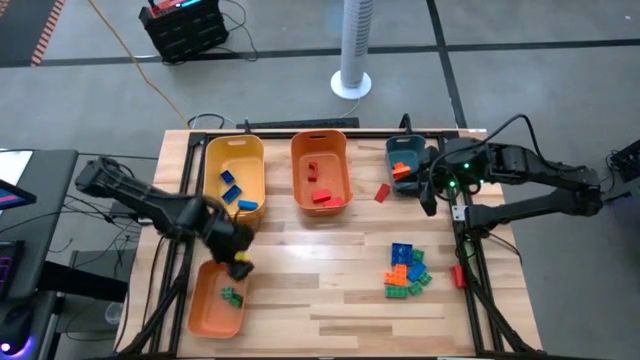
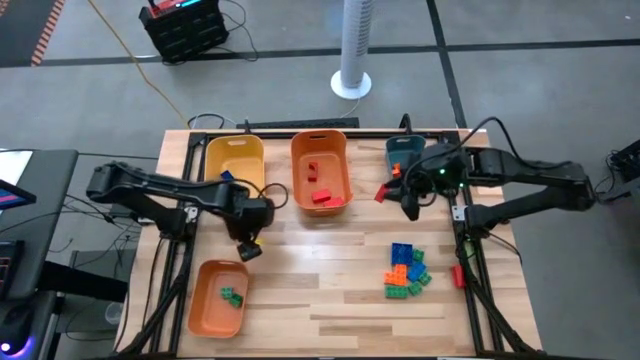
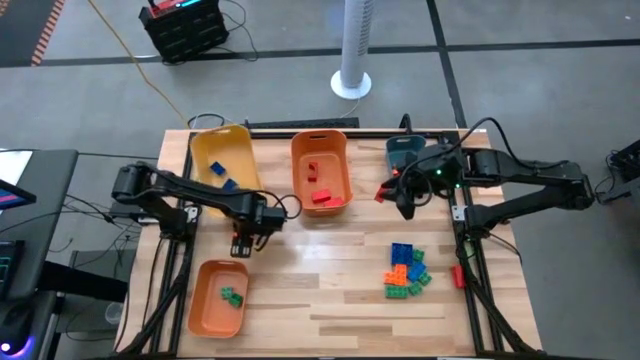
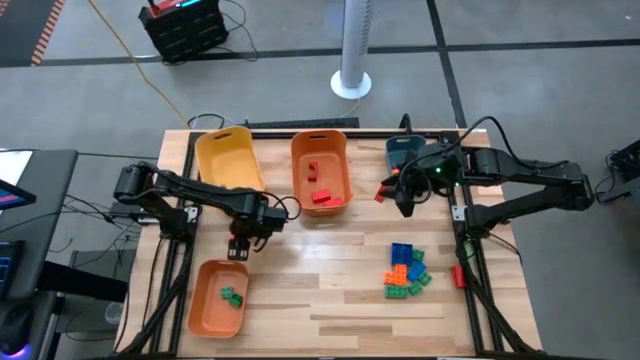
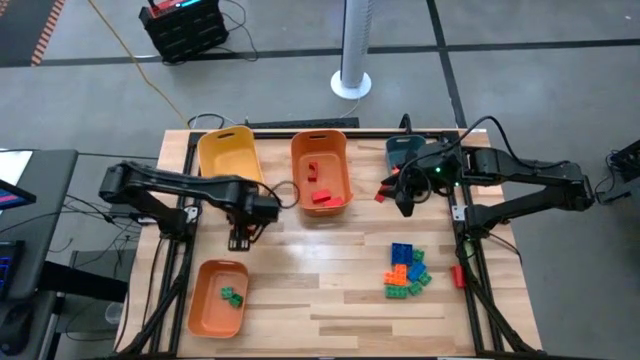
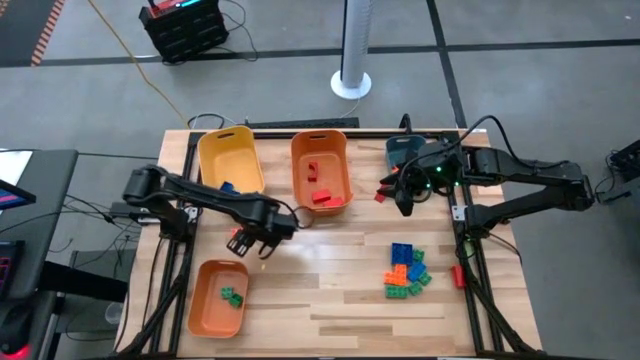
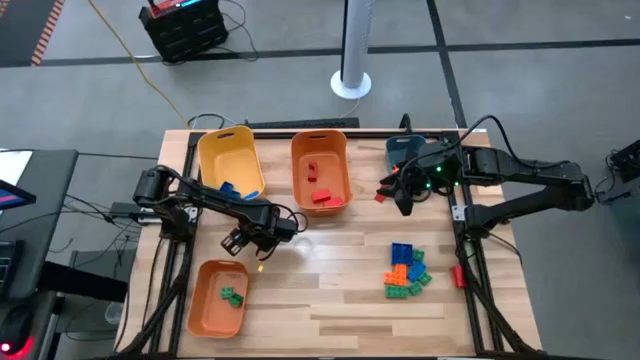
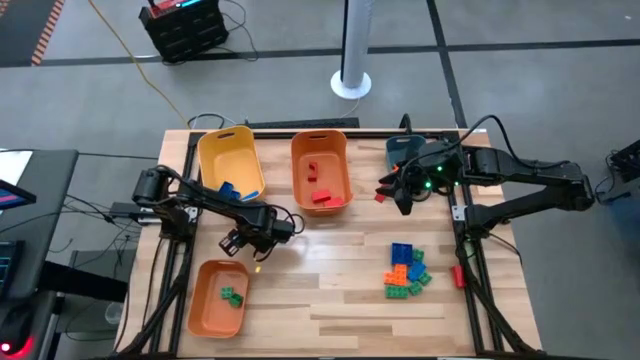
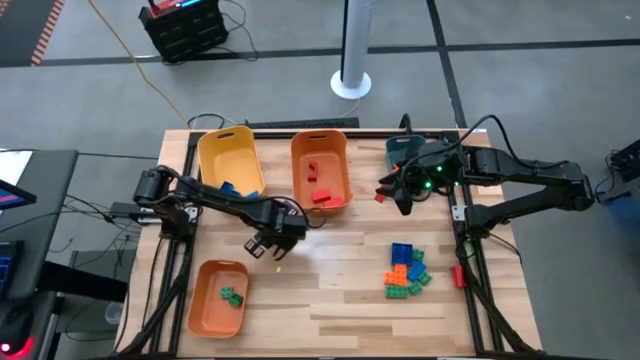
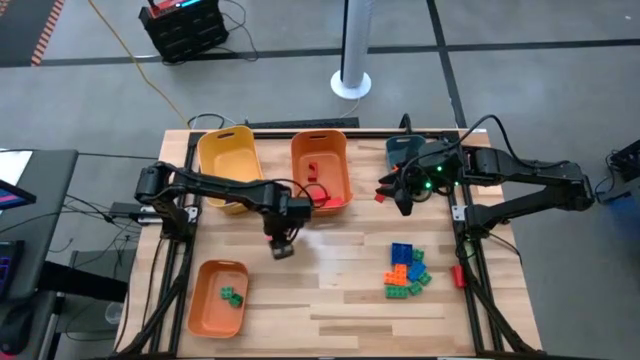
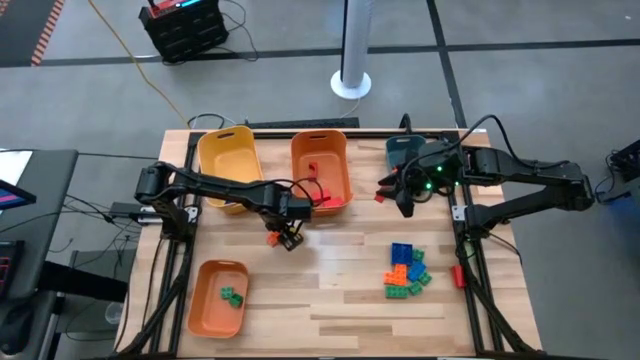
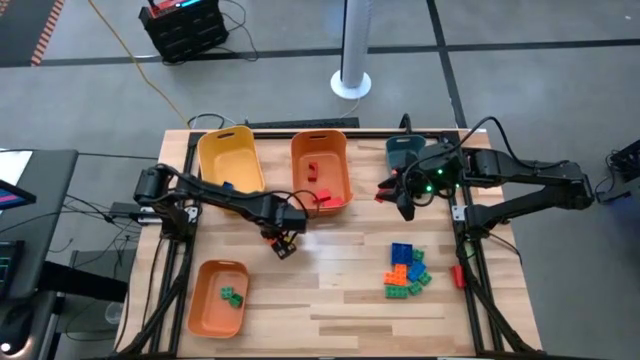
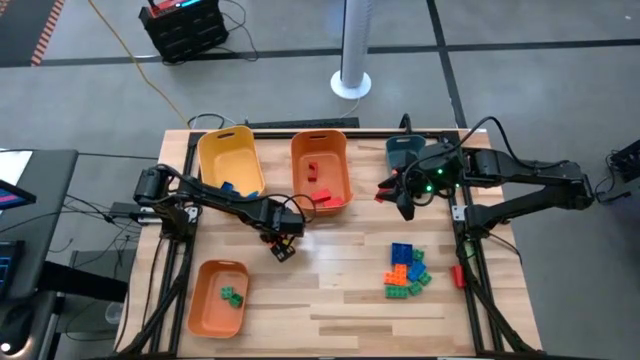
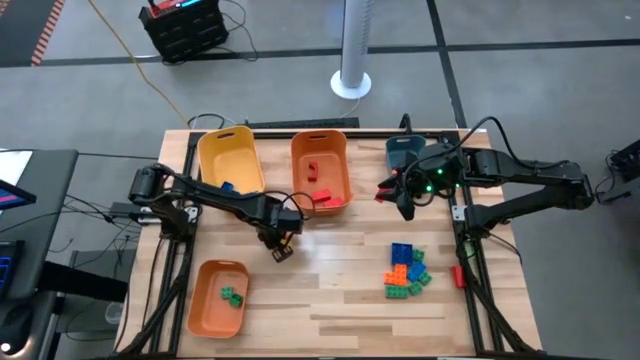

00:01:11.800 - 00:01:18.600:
Task: Sort blocks
Put the orange game piece into the blue bin

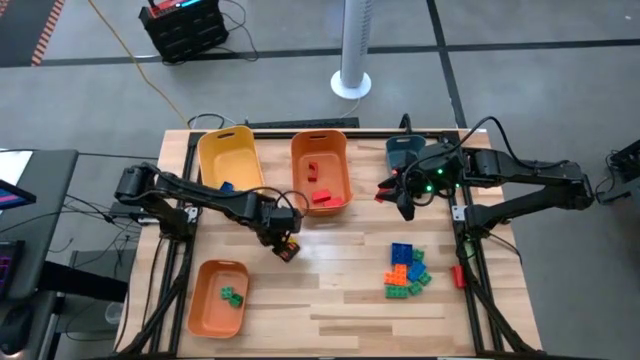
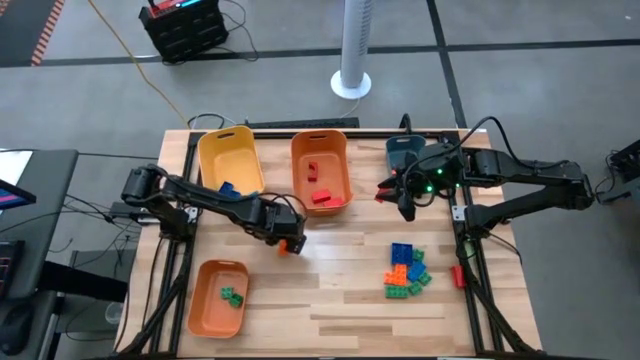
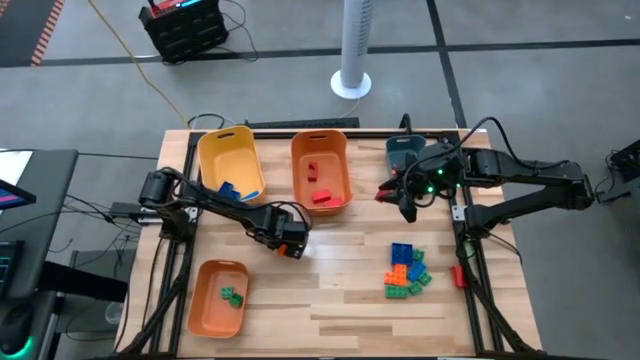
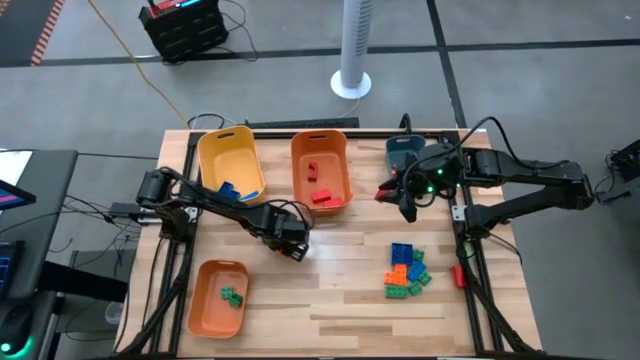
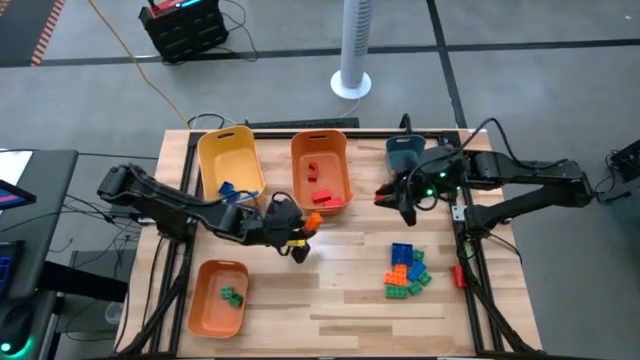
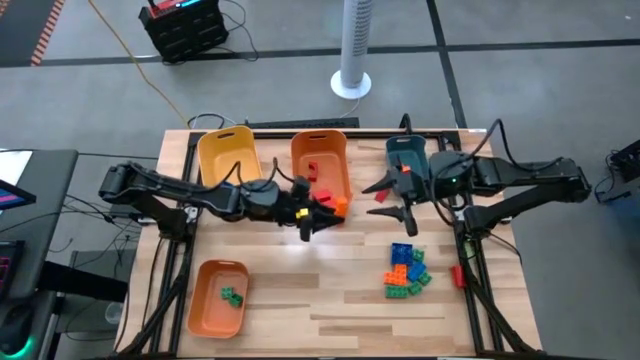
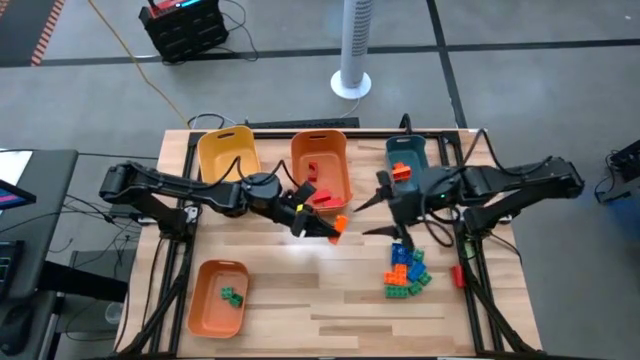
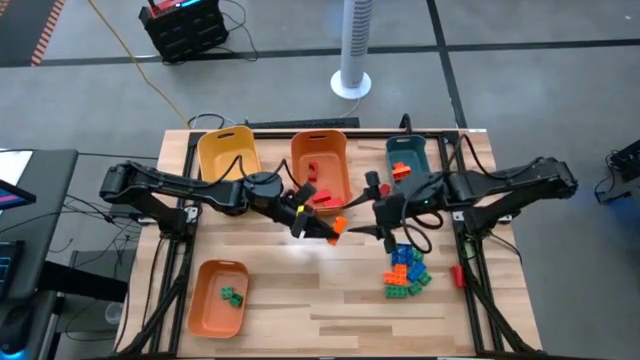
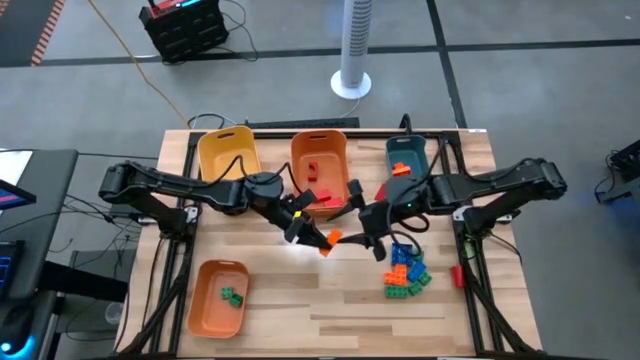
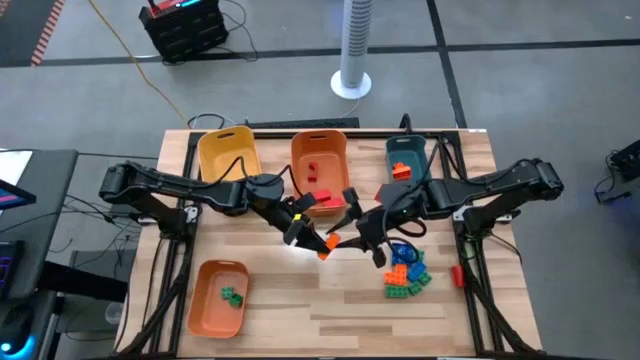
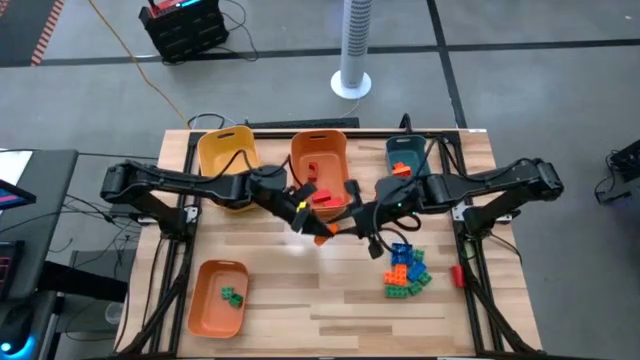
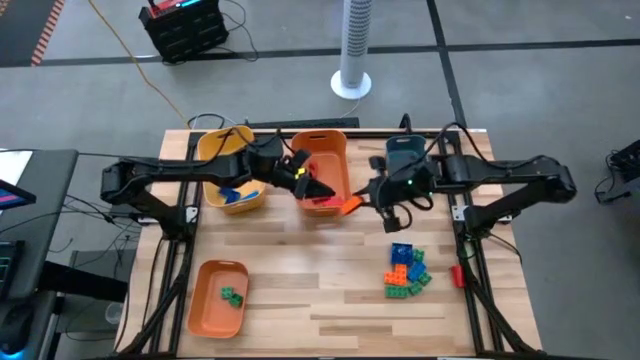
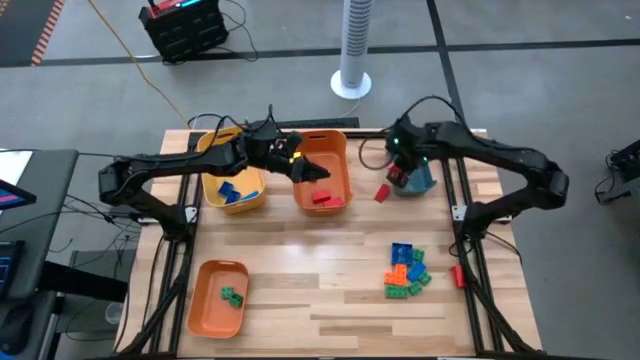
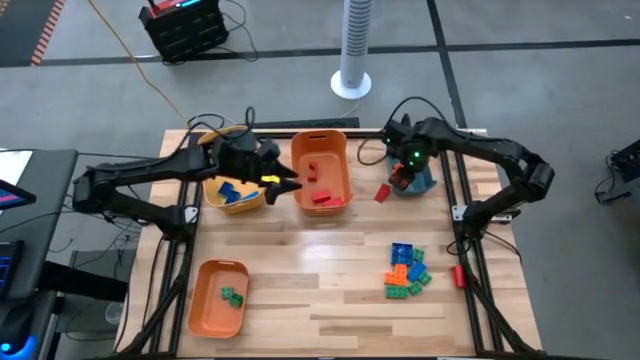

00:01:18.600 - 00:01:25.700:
Put the orange game piece into the blue bin

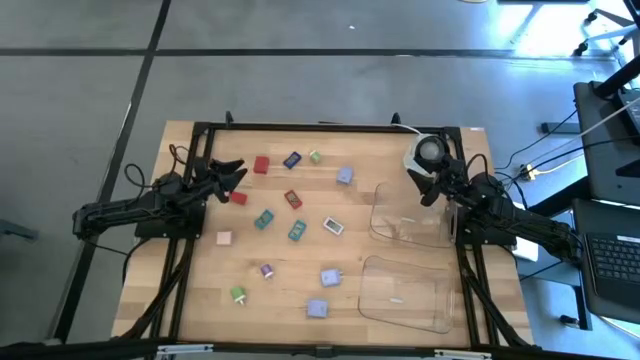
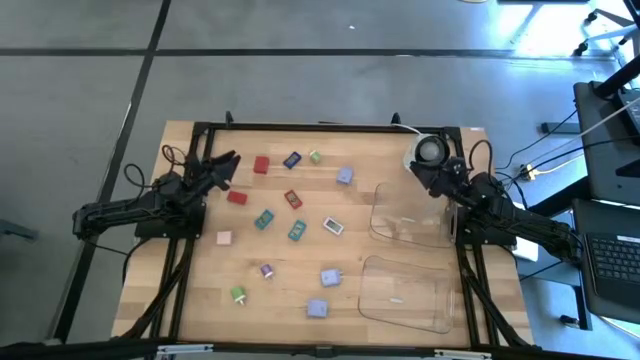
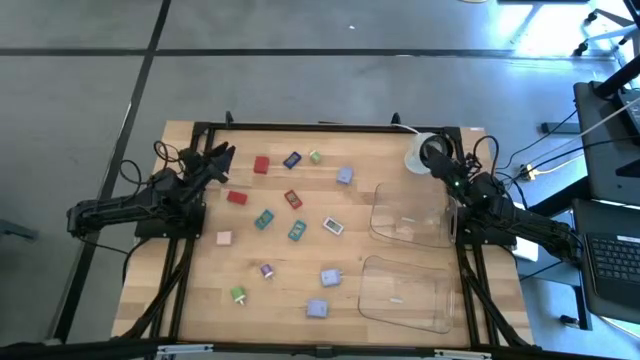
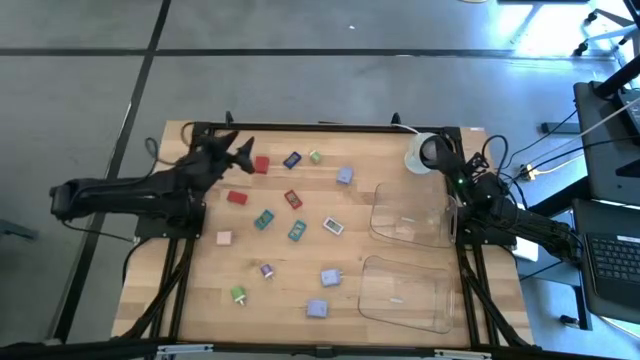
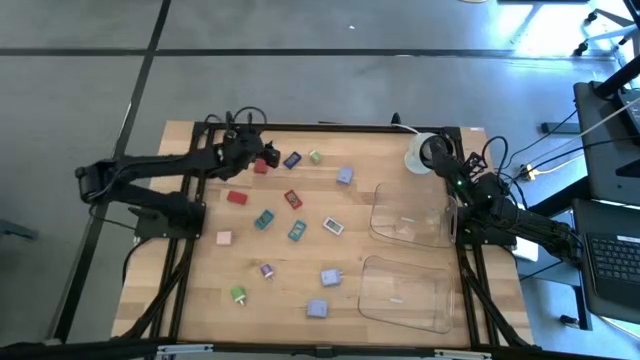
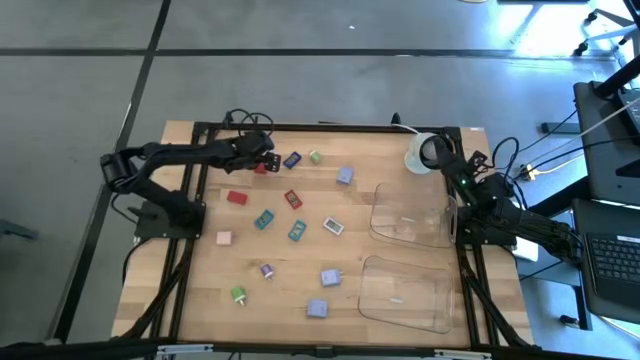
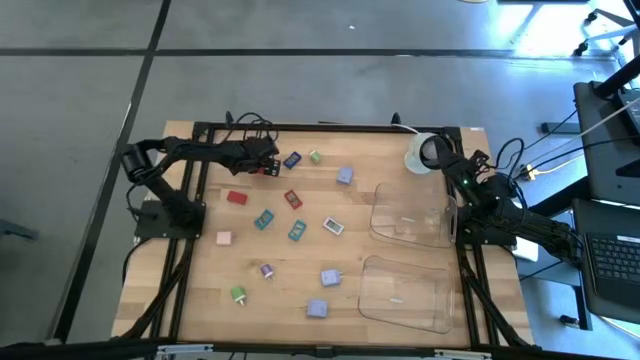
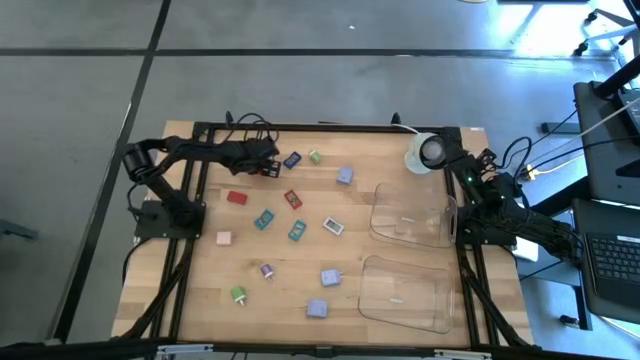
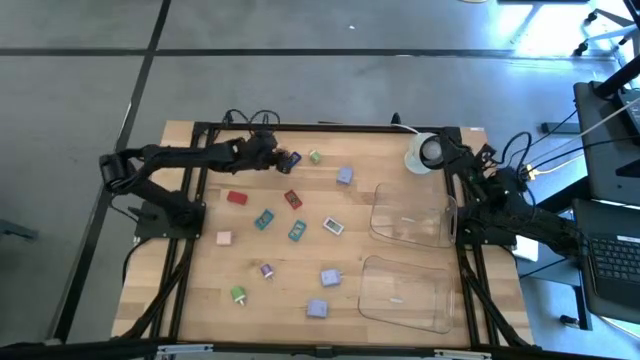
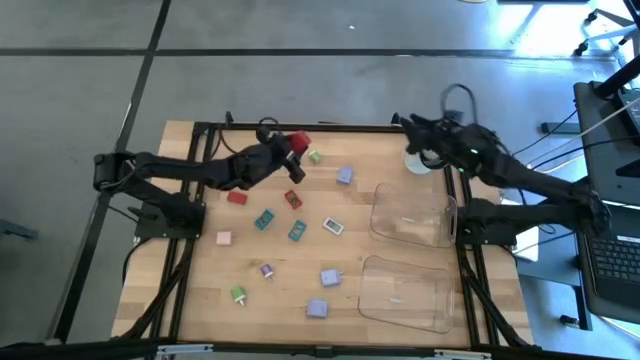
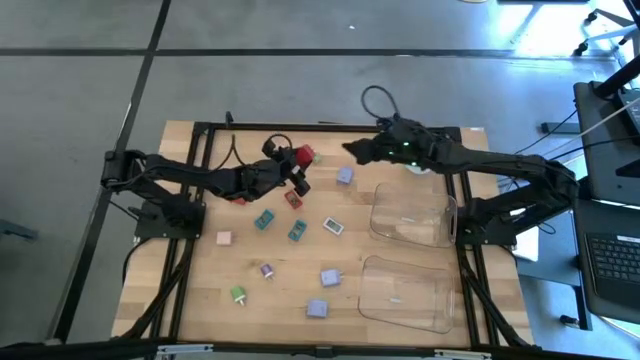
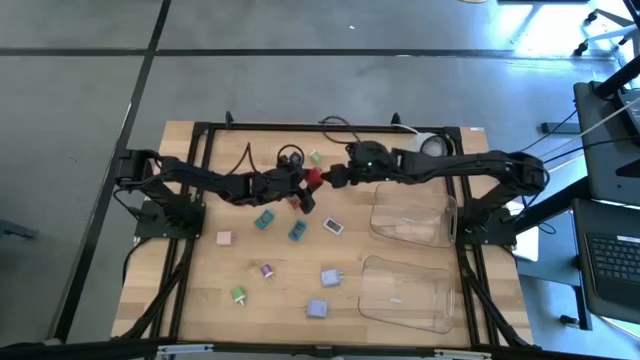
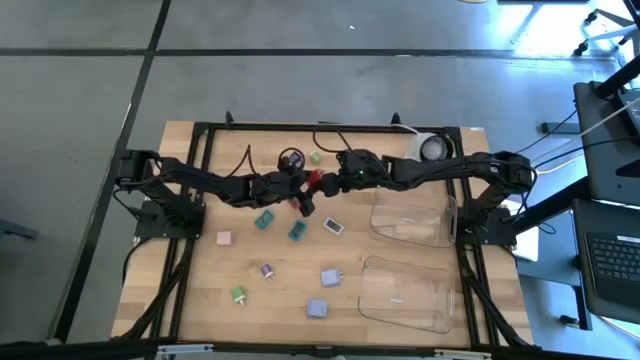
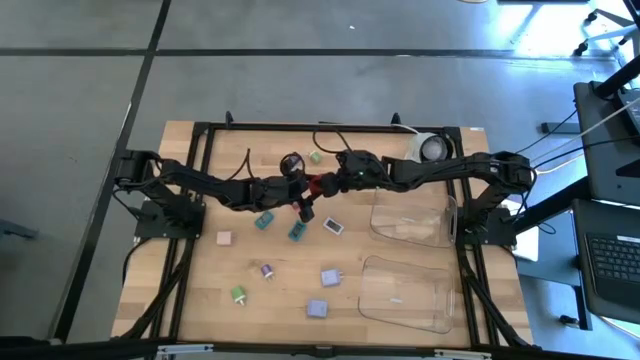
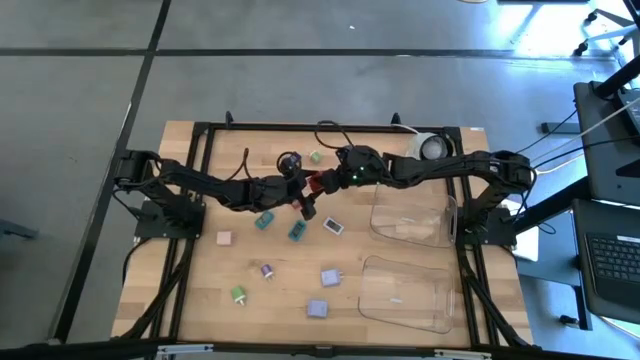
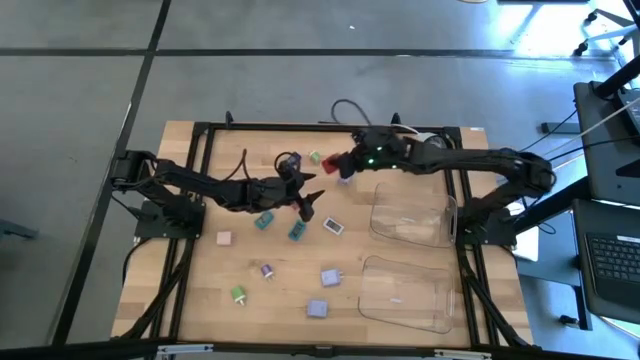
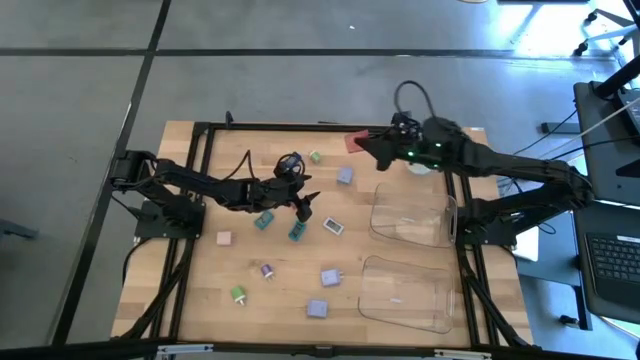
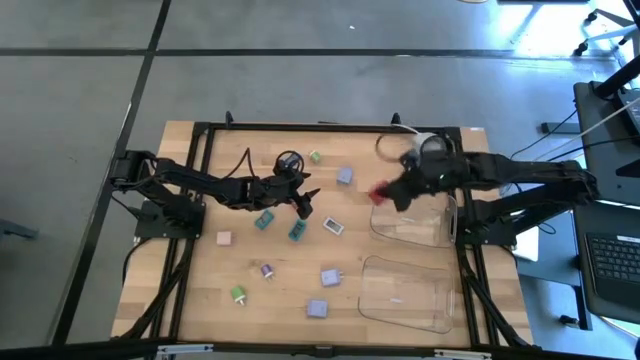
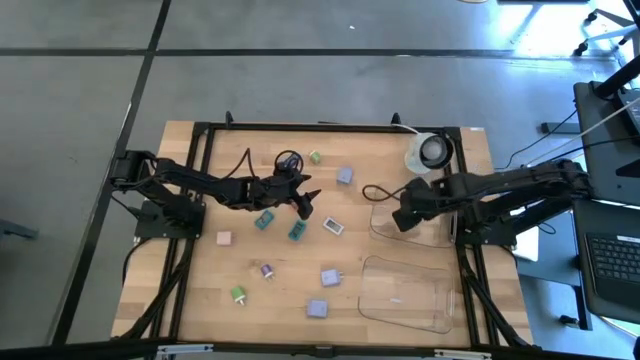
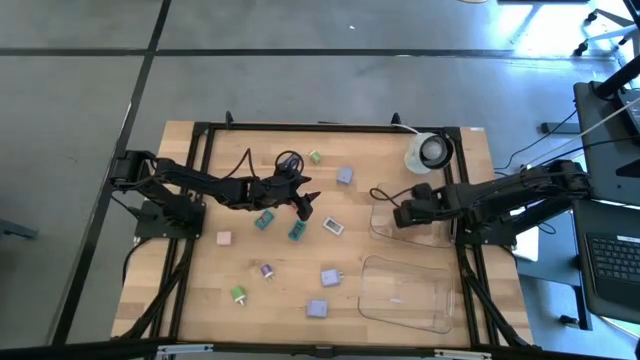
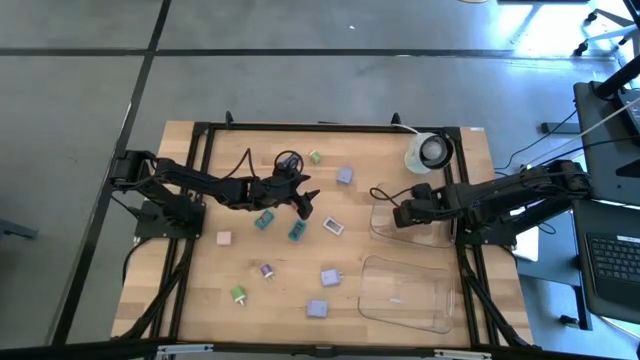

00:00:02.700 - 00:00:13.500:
Task: Pick & Place Office items
Put the red charger adapter into the top transparent bin
